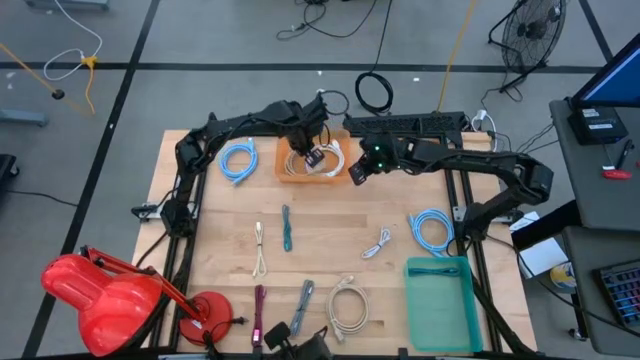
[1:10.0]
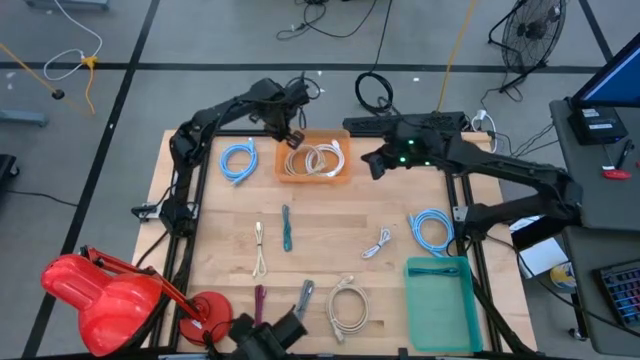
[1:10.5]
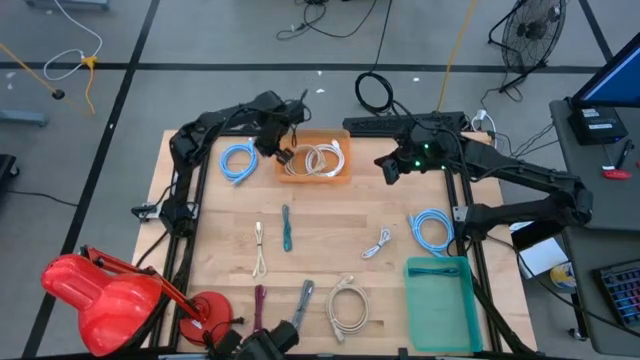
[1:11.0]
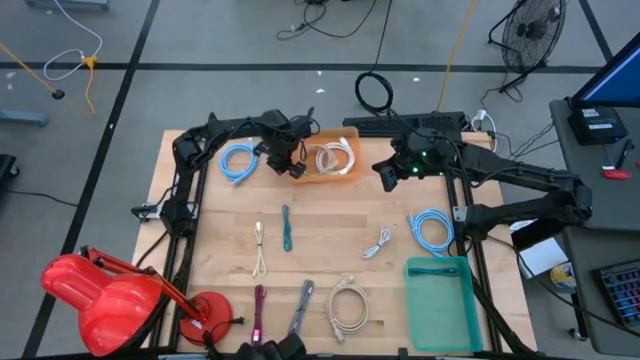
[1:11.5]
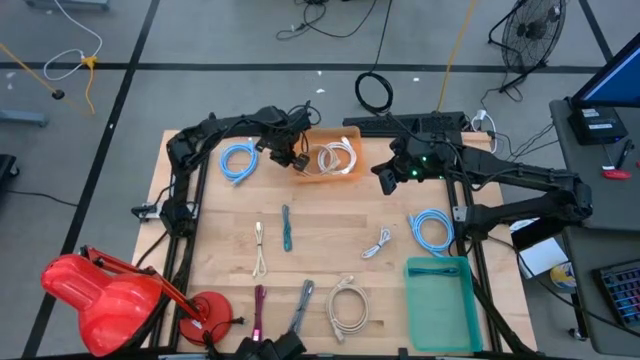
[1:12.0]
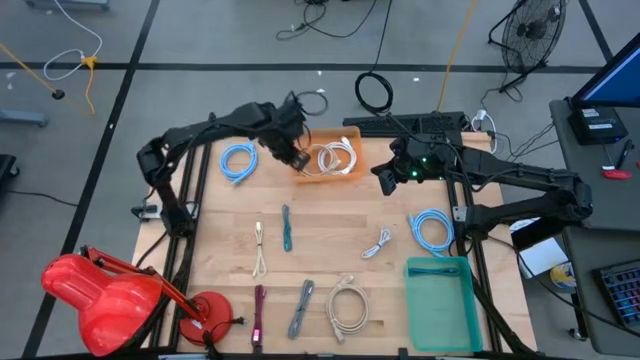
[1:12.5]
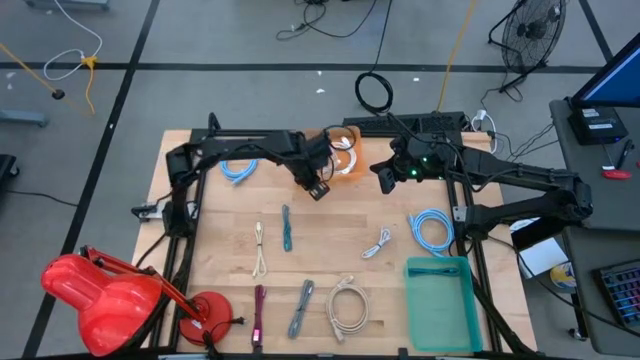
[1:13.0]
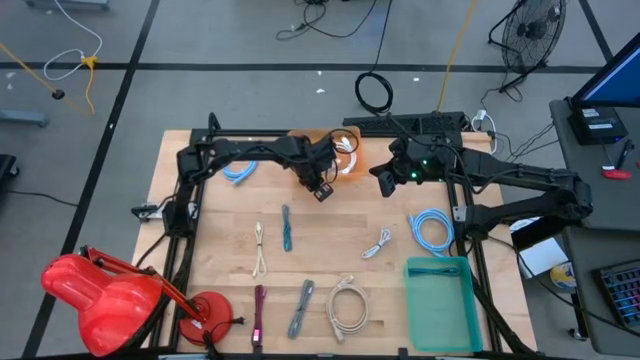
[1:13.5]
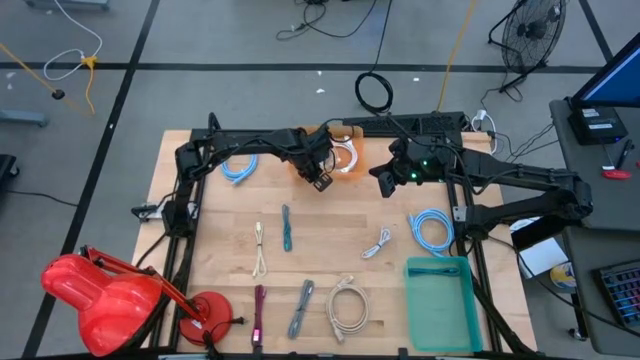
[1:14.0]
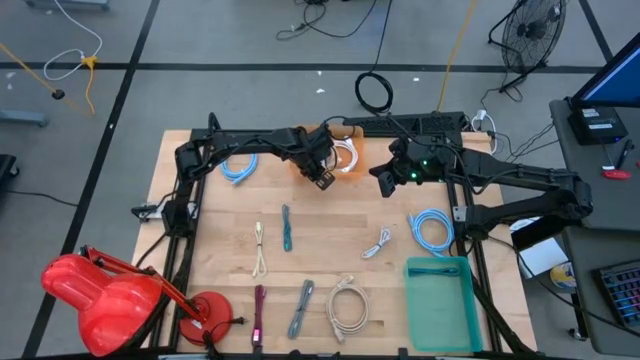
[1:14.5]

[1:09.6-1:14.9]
Task: Pick & Place USB Port
Adjust the orange bin

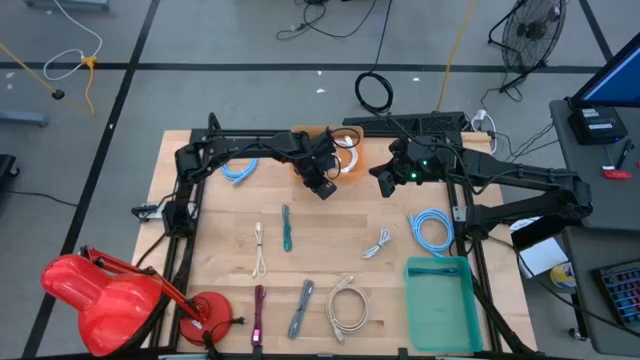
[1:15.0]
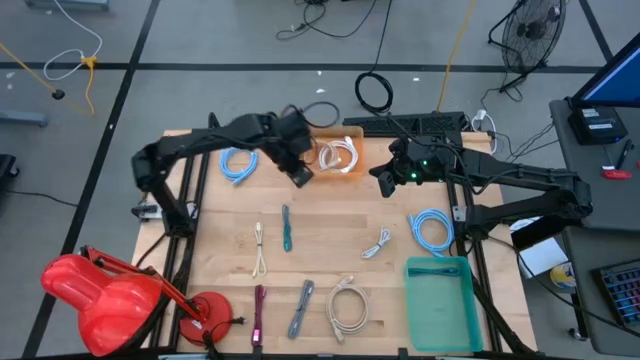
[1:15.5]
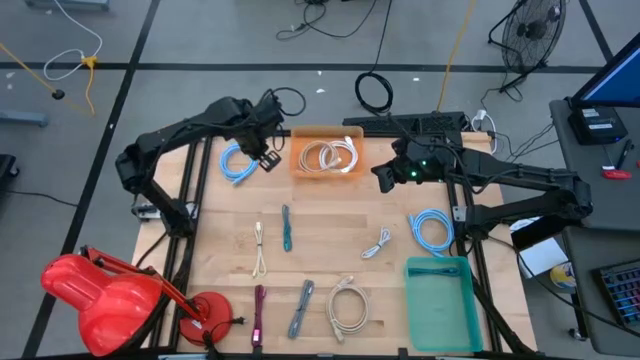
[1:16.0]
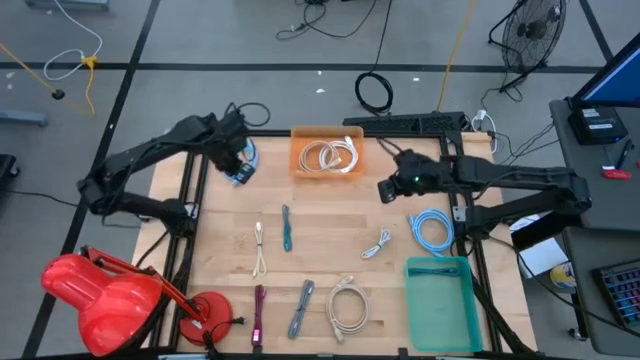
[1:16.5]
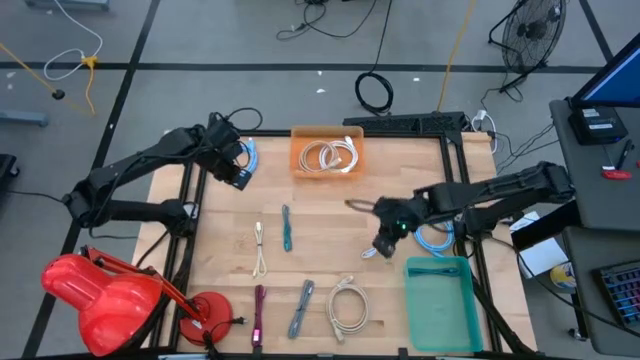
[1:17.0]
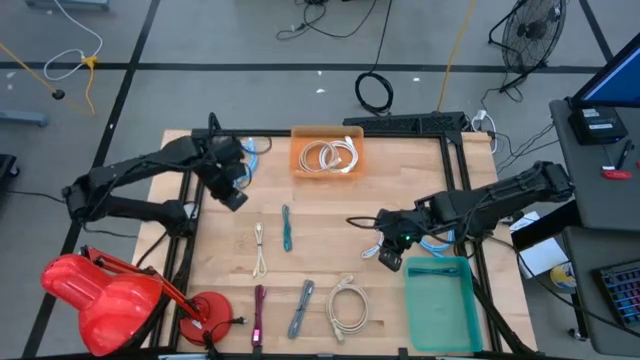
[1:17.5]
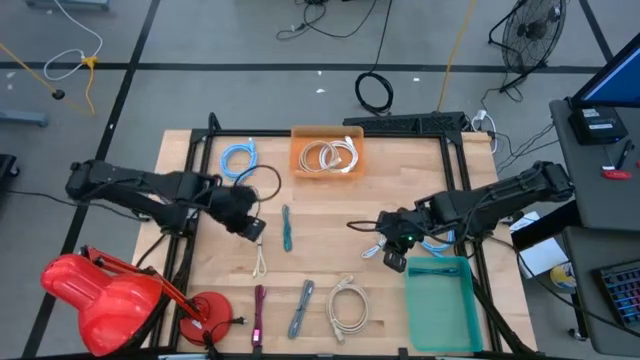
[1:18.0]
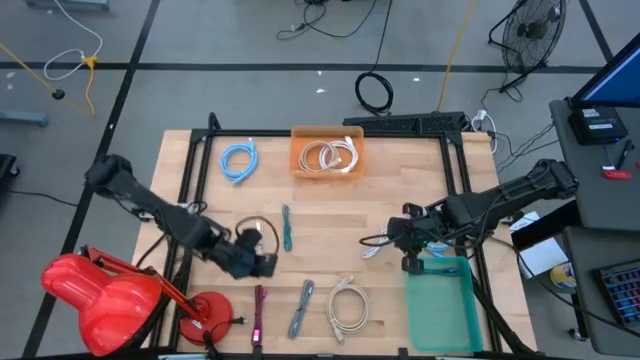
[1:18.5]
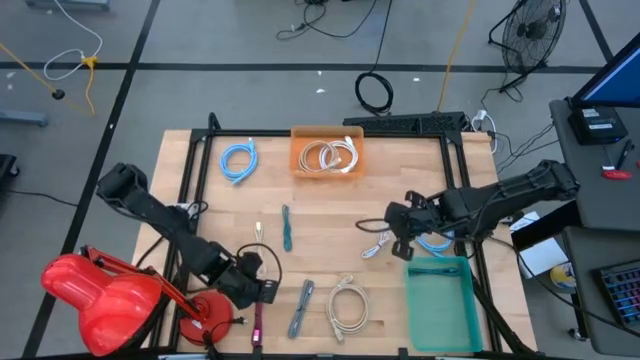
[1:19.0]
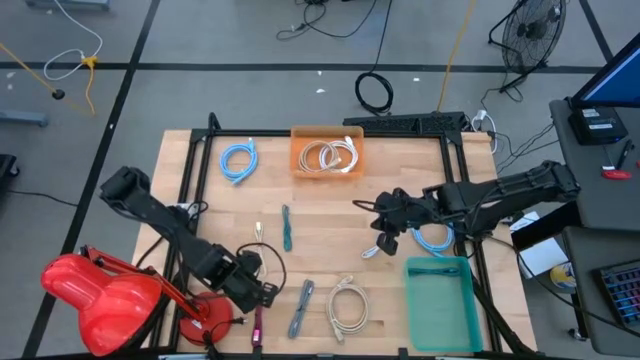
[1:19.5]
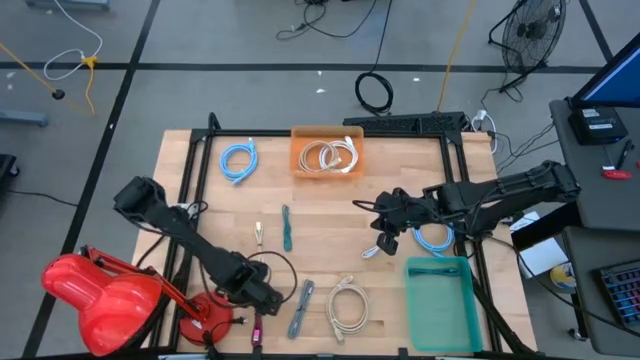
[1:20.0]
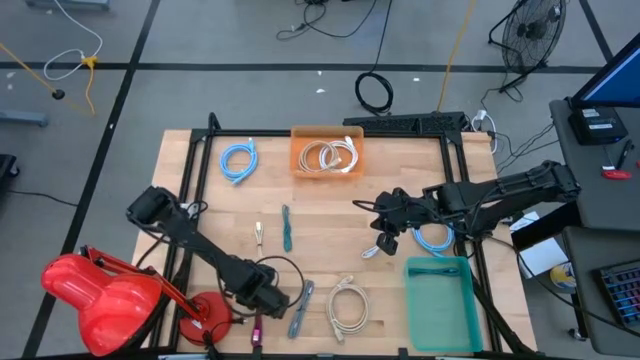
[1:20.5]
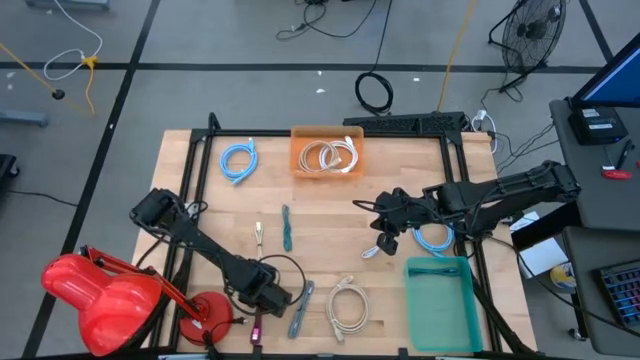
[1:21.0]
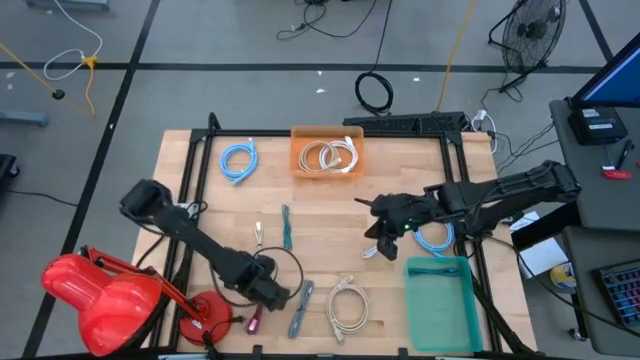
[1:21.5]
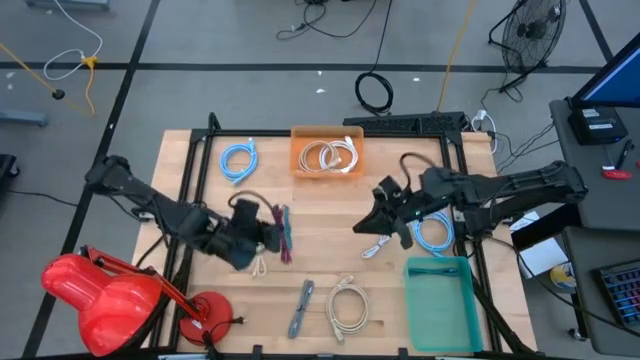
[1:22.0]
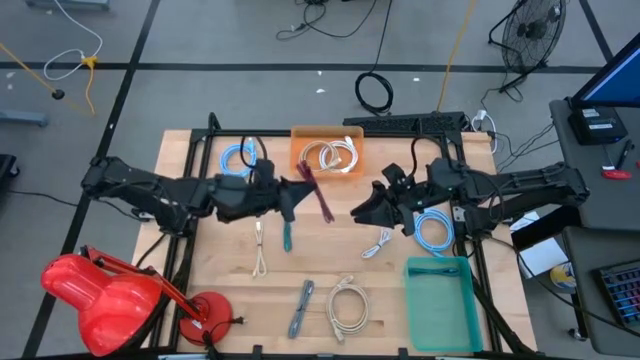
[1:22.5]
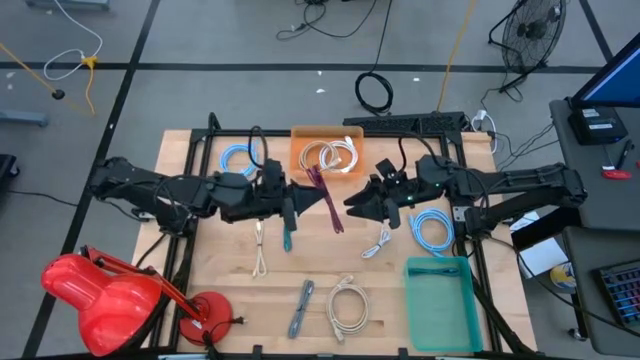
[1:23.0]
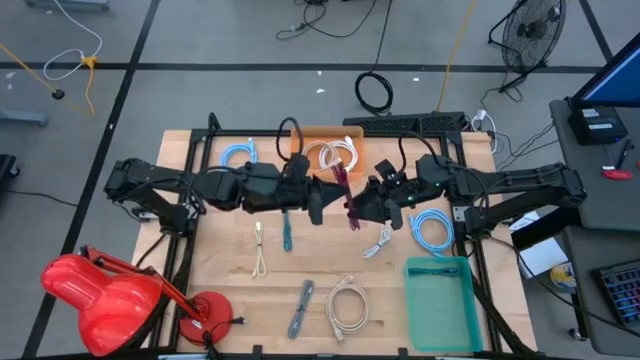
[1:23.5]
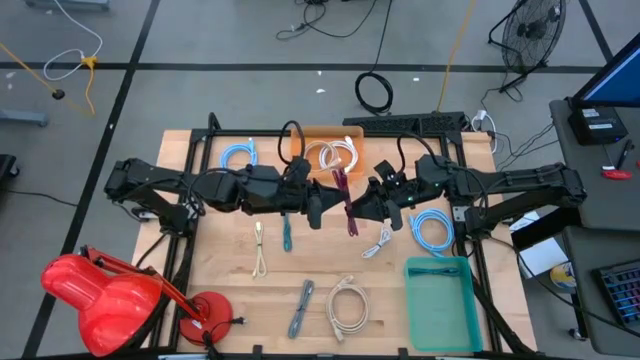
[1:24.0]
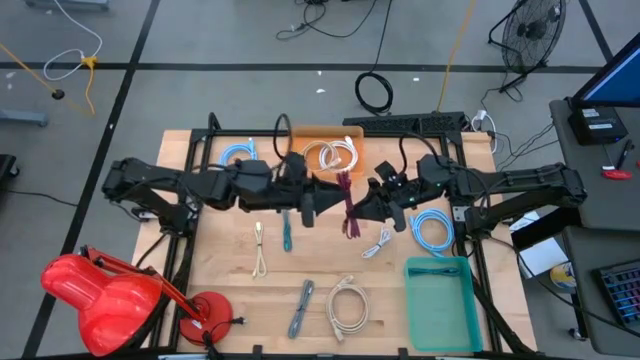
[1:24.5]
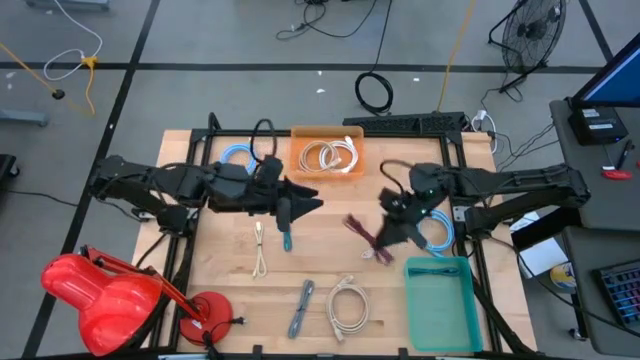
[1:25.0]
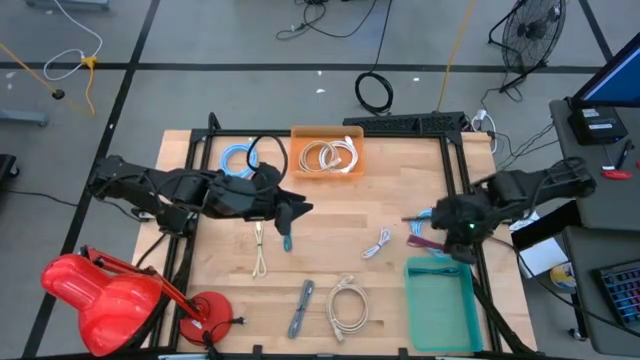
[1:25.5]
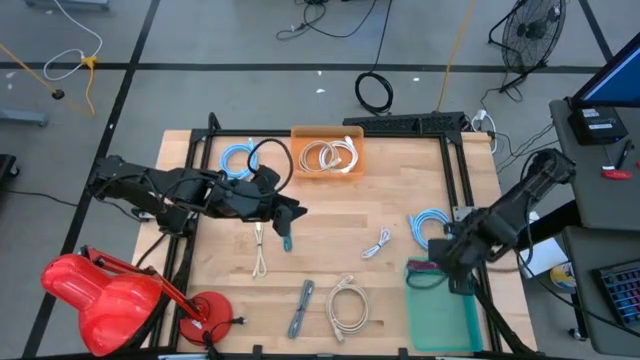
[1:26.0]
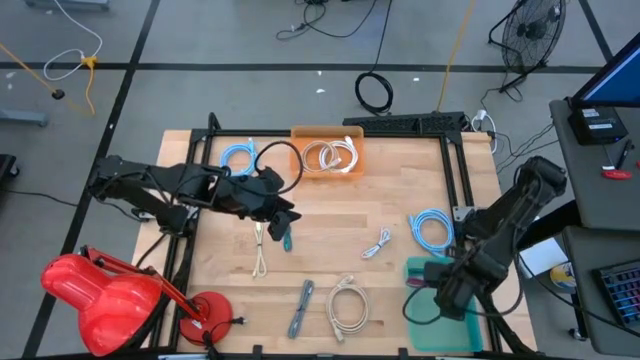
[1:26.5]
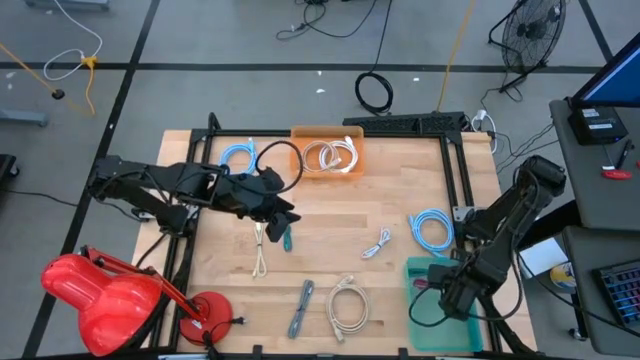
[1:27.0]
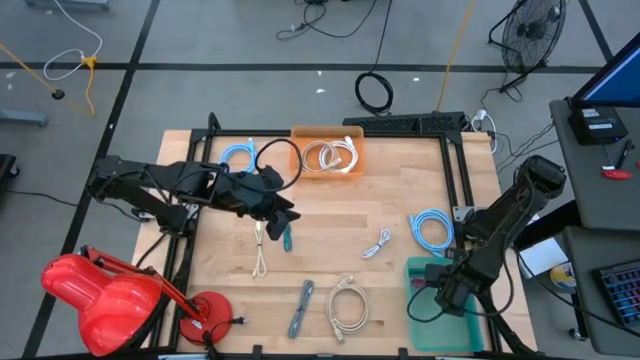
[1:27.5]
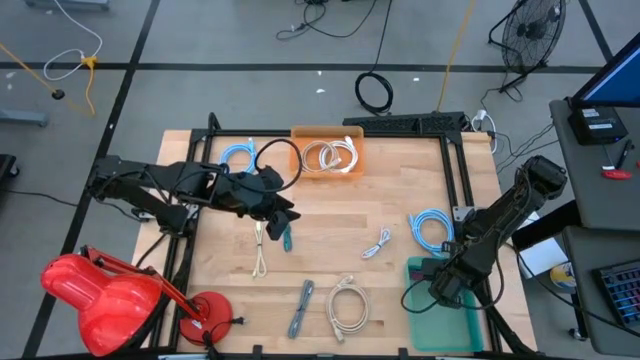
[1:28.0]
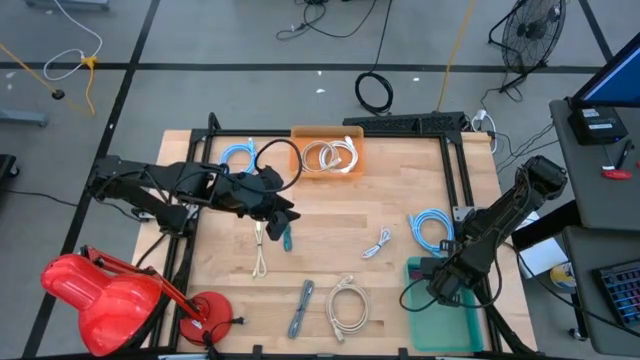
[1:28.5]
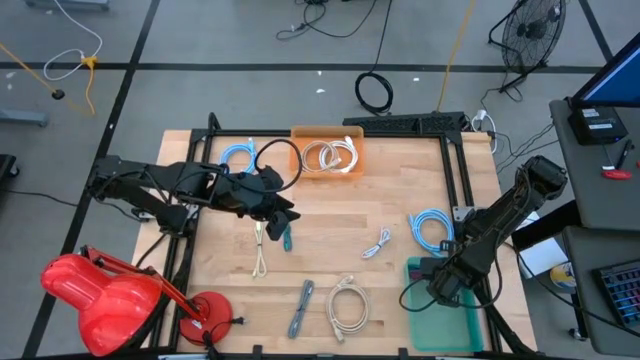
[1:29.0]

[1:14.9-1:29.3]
Put the small pink charger cable into the green bin
